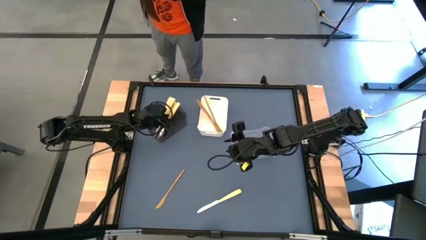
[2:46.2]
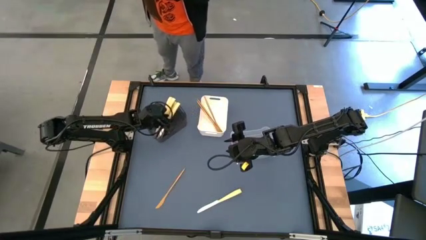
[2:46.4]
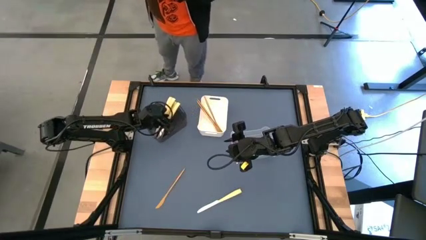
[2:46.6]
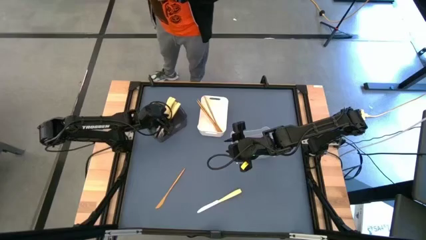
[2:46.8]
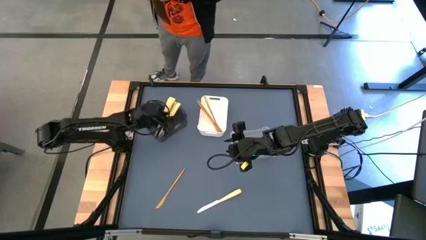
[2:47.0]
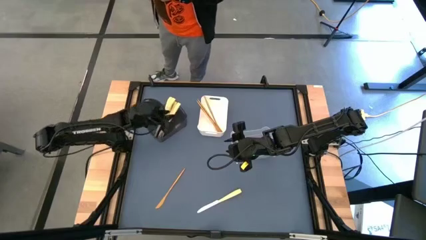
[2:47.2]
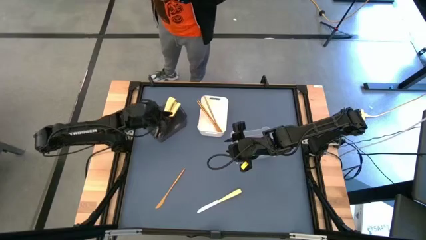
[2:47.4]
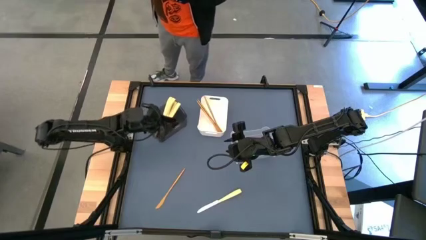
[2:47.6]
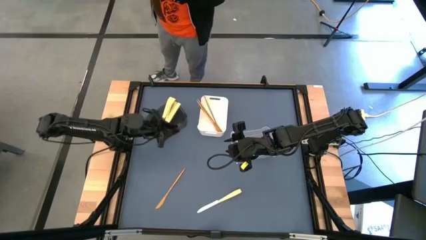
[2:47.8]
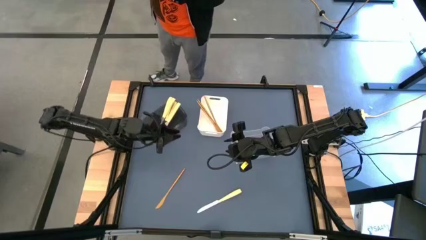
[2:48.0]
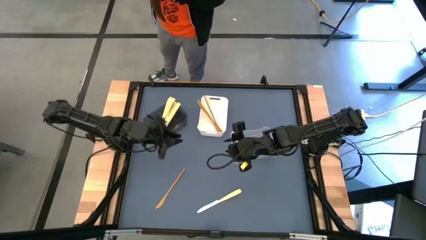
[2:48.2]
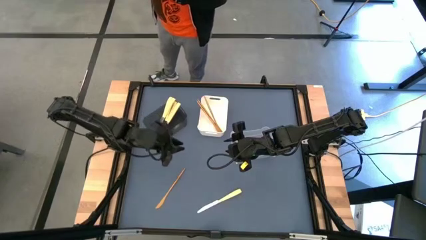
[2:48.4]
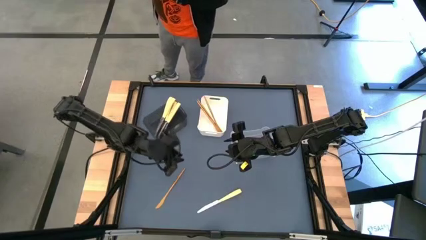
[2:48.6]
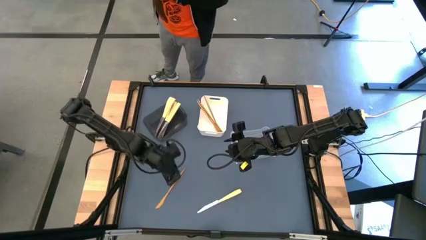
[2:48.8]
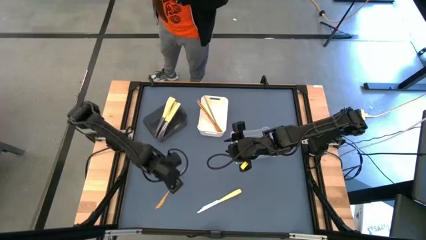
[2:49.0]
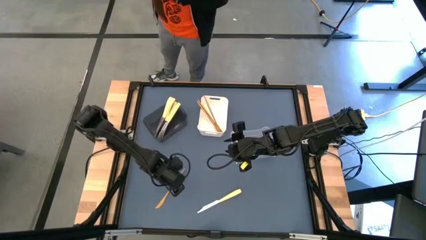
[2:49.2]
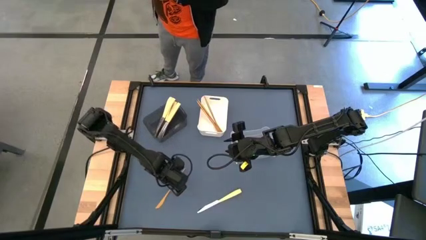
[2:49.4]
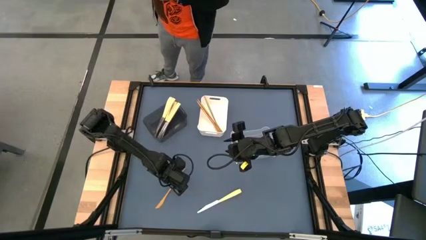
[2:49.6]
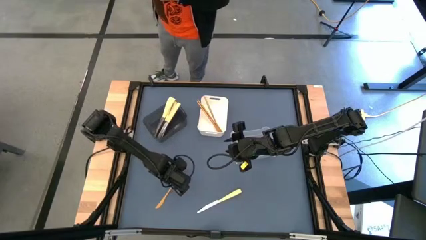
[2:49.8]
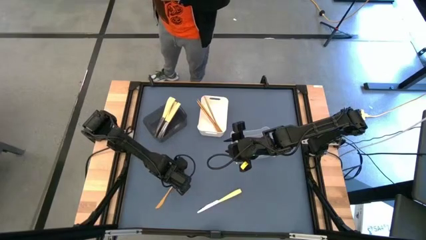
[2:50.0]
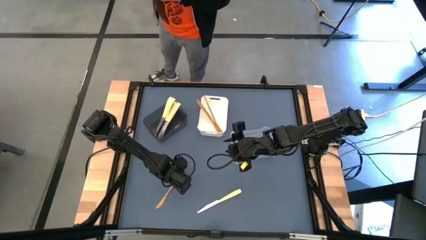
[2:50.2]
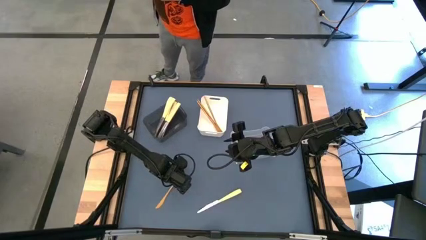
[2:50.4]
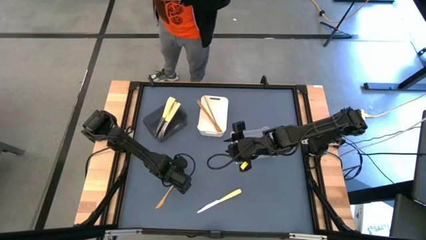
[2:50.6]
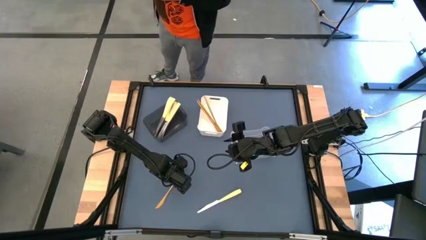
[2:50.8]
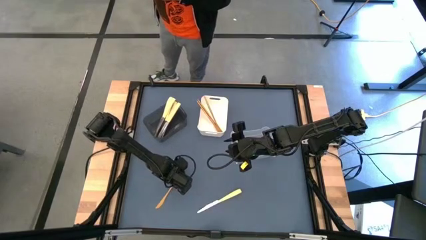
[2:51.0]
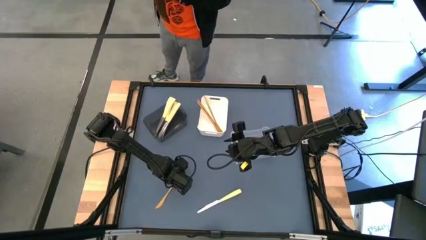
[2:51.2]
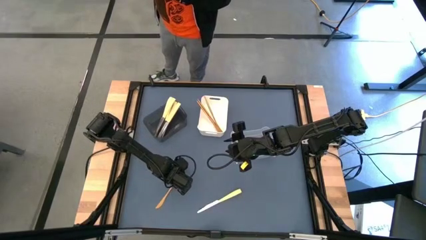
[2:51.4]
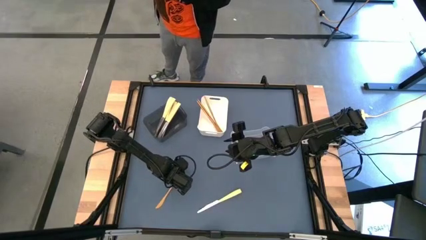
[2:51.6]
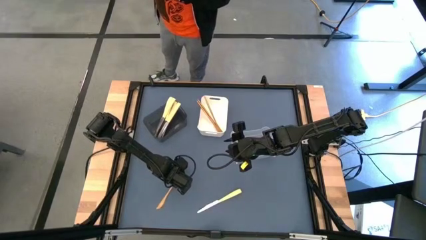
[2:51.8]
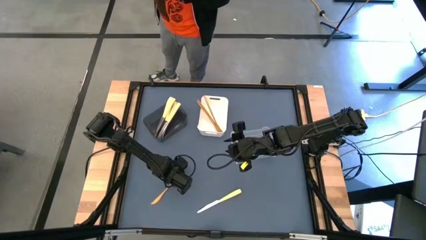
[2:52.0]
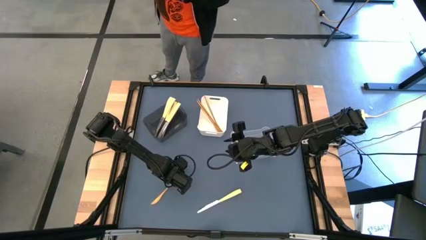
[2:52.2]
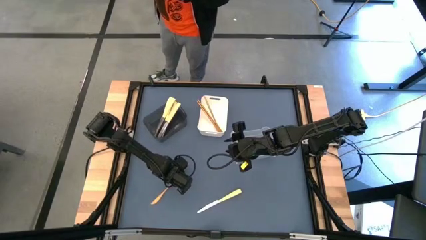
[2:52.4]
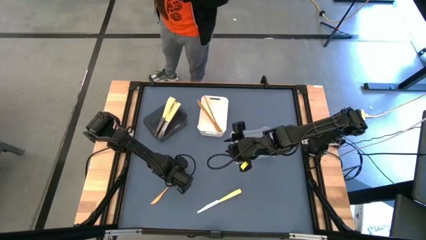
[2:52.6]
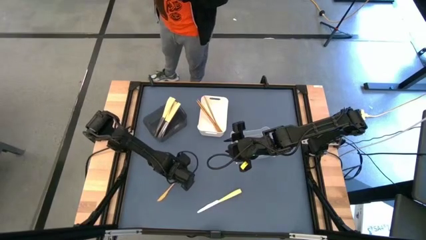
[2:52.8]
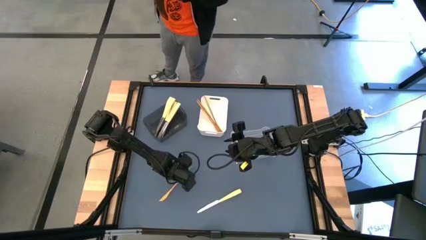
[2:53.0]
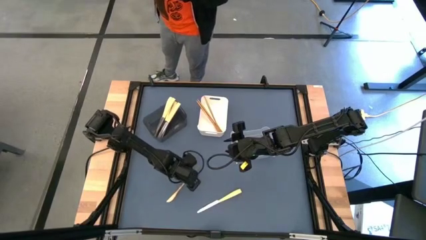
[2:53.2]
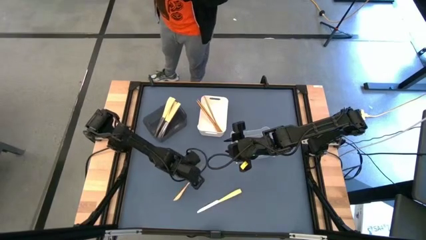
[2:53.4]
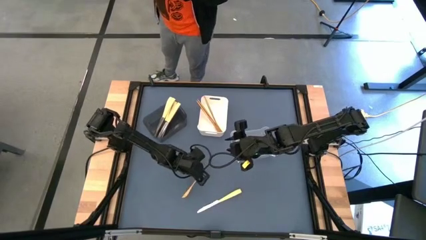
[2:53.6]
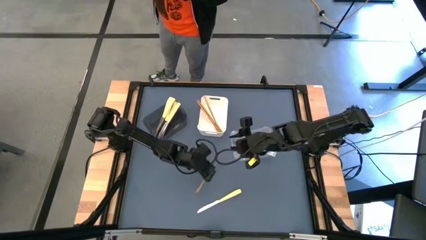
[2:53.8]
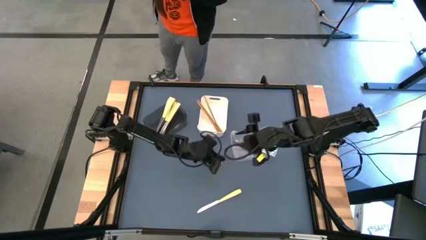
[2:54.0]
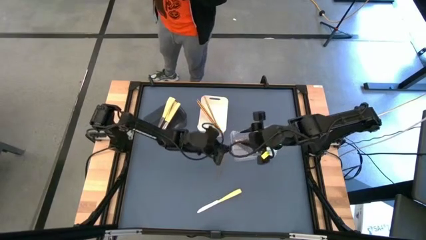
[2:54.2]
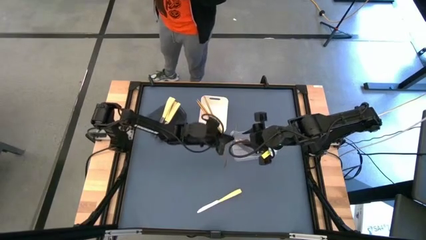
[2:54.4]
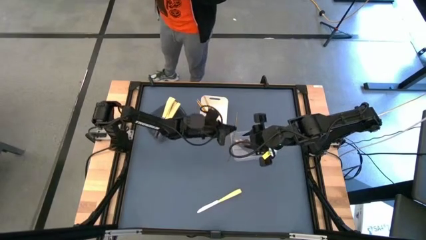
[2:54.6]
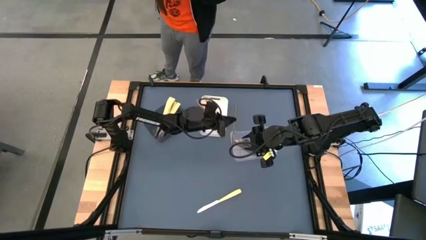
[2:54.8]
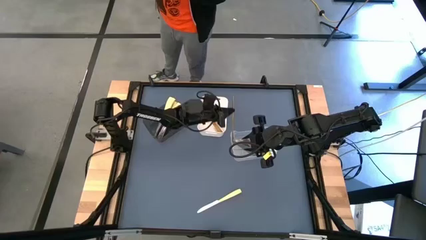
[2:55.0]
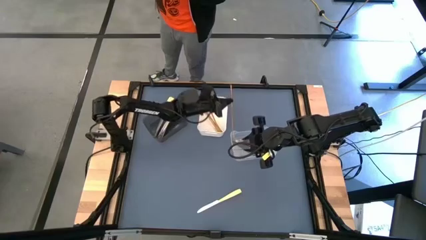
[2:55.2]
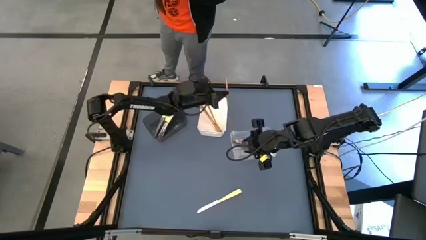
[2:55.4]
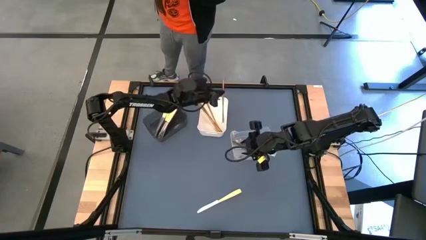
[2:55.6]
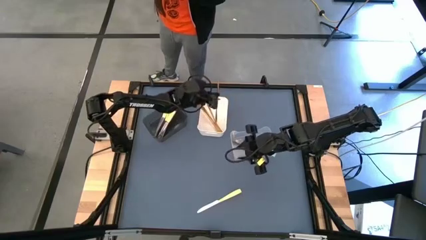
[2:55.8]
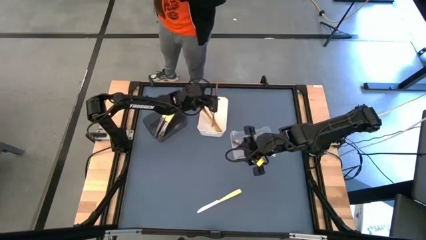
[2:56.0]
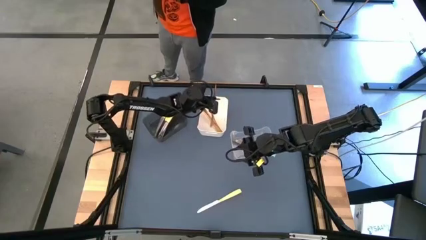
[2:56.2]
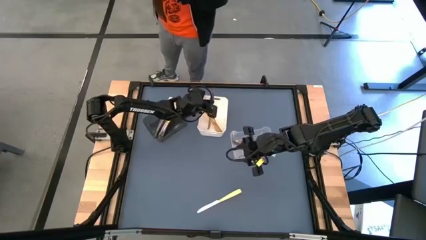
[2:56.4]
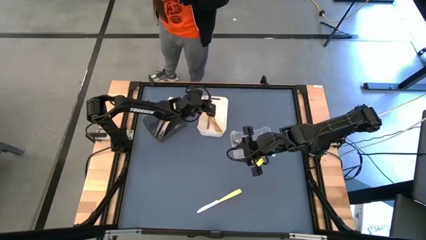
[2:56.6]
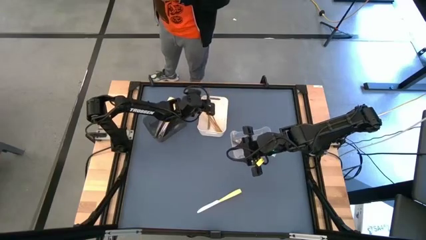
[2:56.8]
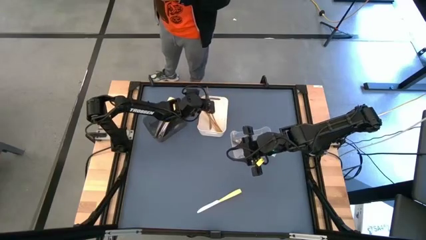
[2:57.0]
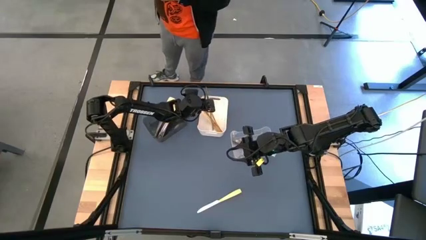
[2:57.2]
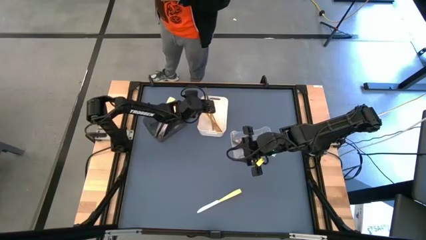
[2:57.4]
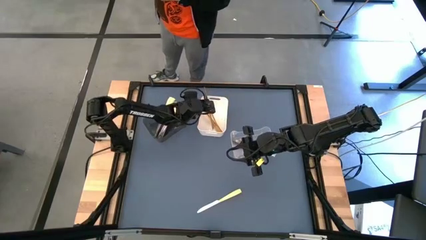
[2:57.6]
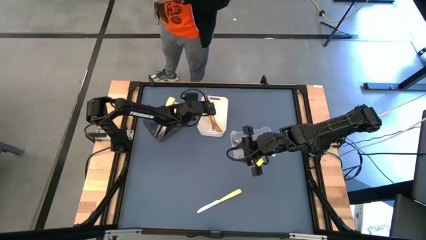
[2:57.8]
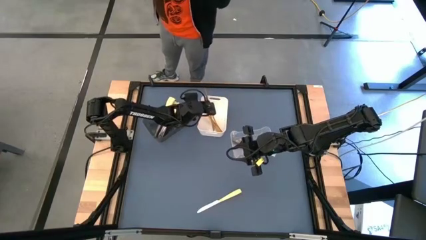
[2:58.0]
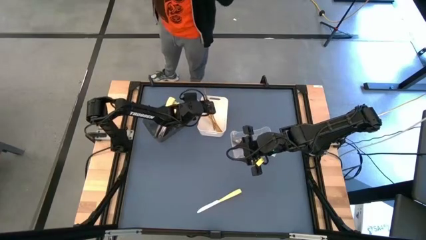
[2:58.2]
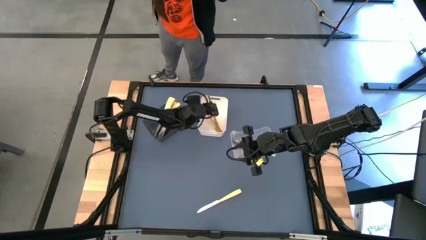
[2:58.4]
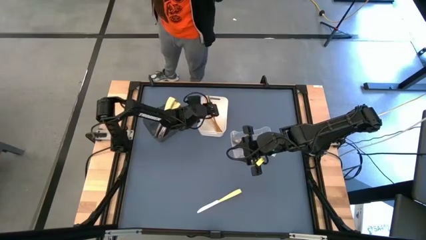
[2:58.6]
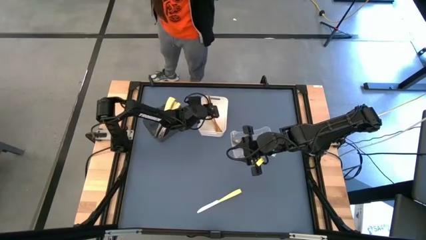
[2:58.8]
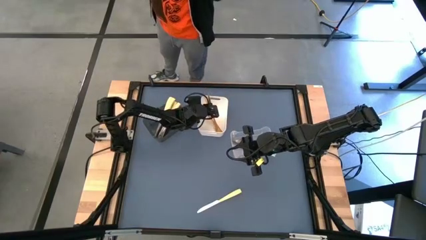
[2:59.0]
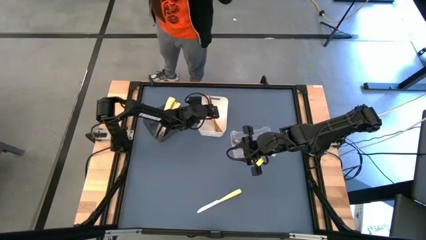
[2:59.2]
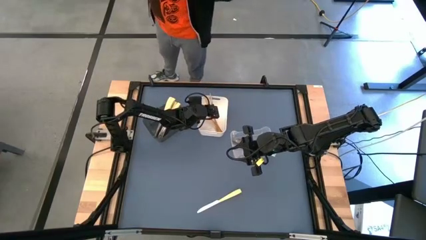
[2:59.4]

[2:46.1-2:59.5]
Task: Sort silverware by color (type)
Put the gold knife into the white bin

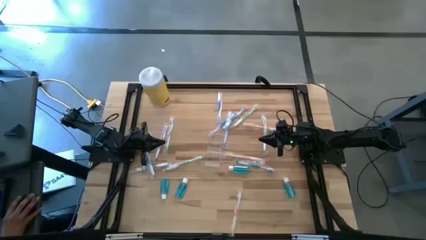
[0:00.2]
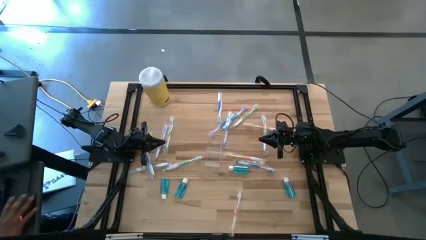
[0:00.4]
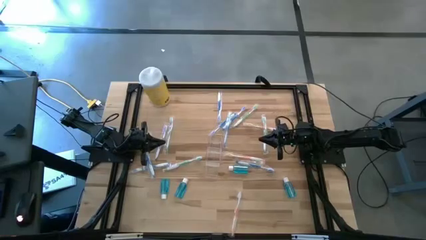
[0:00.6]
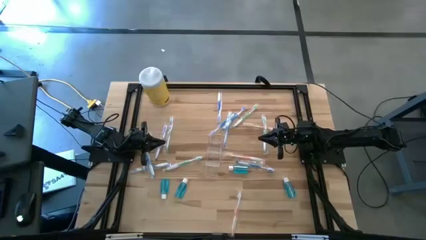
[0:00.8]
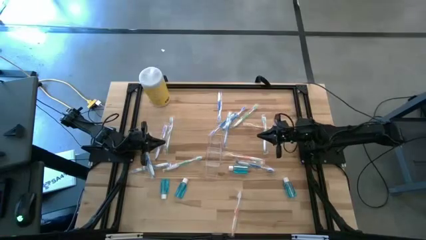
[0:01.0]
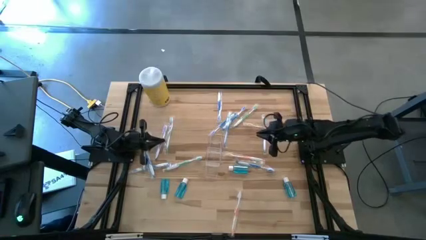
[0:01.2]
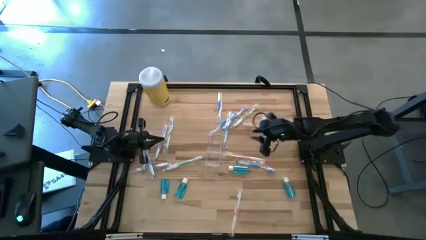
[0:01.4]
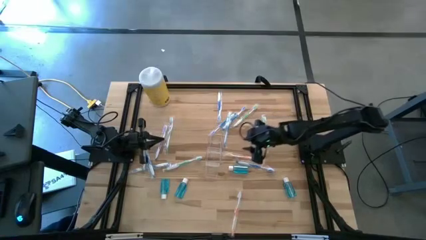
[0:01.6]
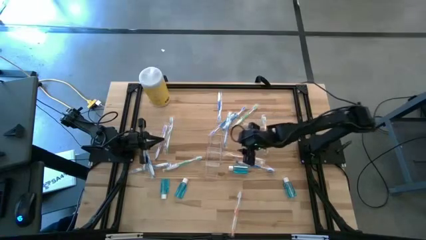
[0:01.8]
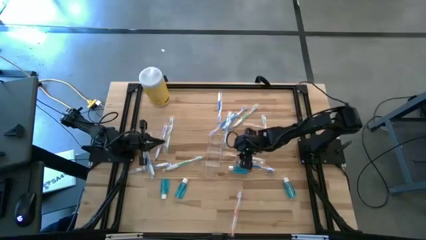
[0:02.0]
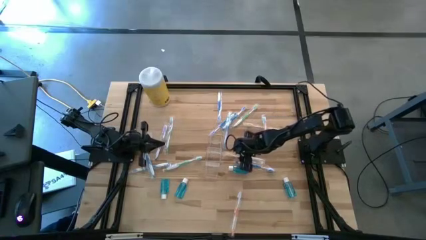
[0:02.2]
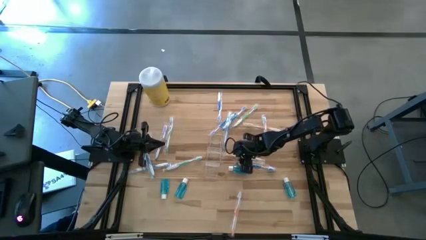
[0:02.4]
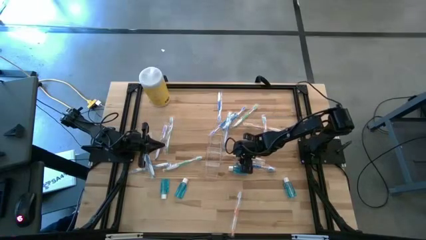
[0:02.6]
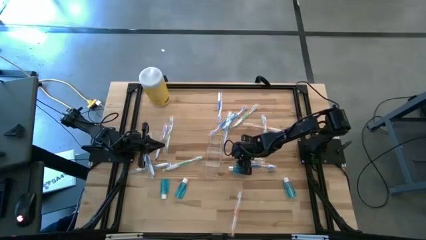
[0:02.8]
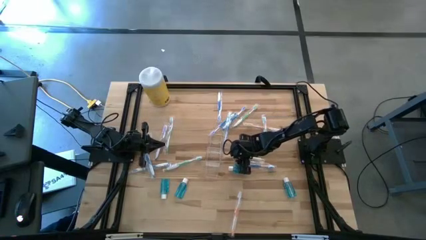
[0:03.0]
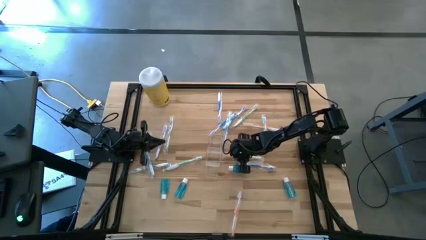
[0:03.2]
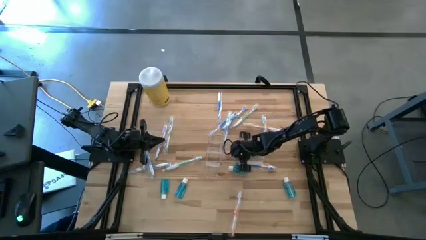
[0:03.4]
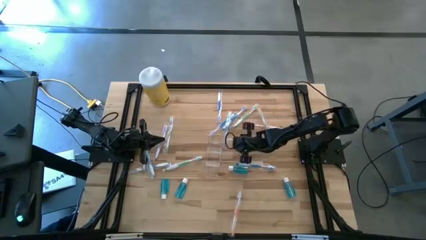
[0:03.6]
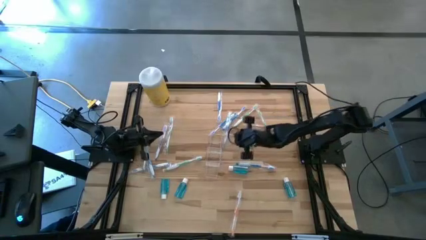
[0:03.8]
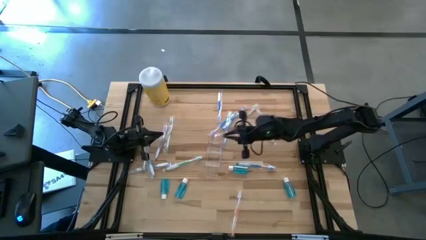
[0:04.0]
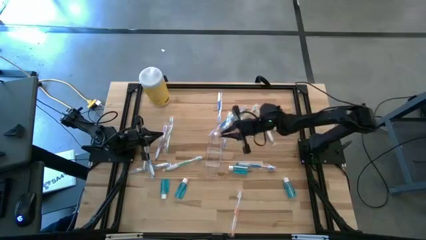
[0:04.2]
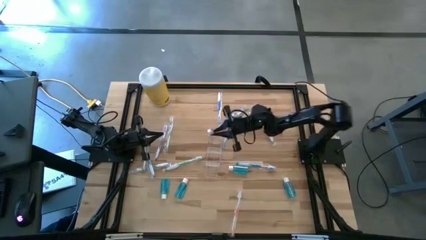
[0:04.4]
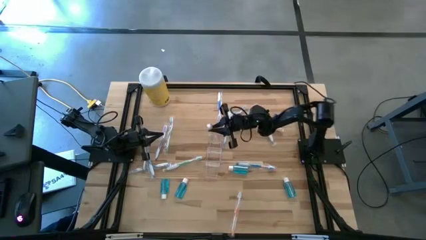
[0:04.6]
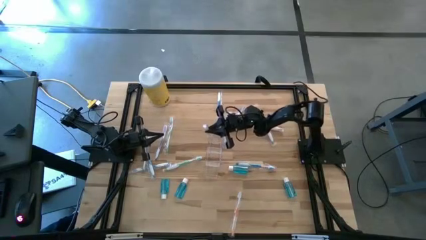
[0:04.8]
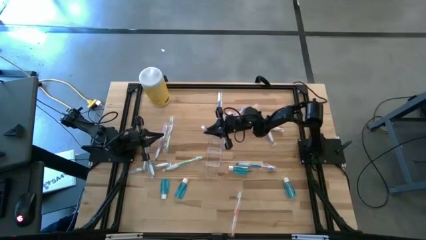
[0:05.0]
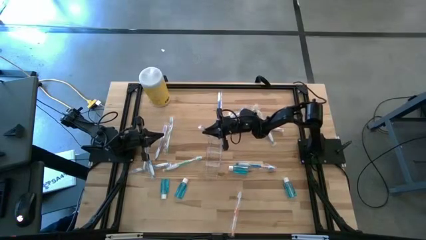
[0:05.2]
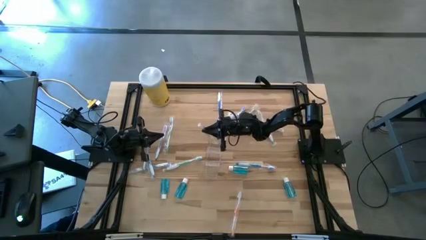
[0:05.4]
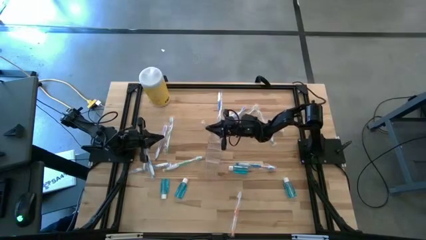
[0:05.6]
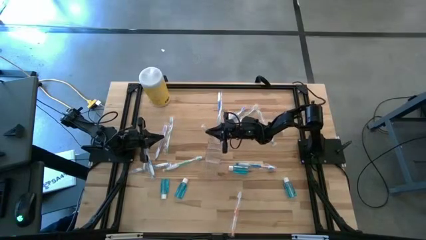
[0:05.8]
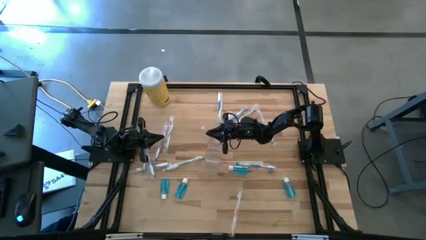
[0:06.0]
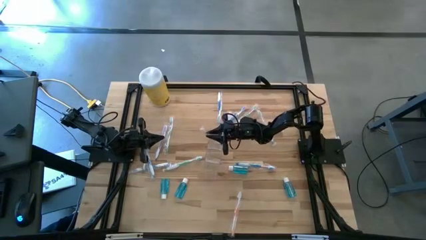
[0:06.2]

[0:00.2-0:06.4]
Task: Pick & Place toothbrushing station
Put the orange toothbrush into the transparent organizer
